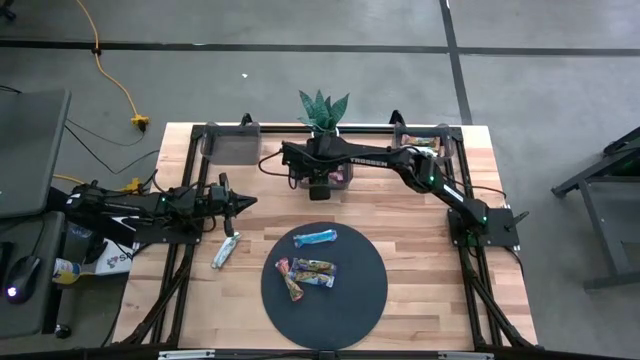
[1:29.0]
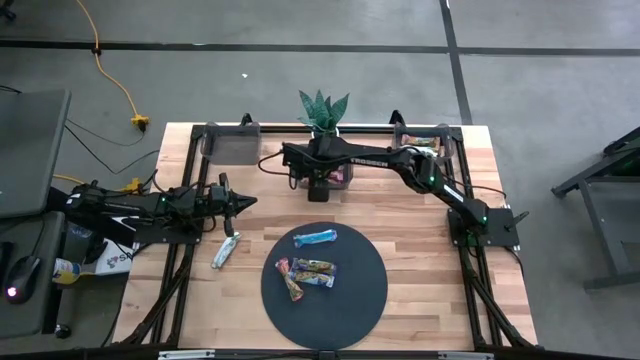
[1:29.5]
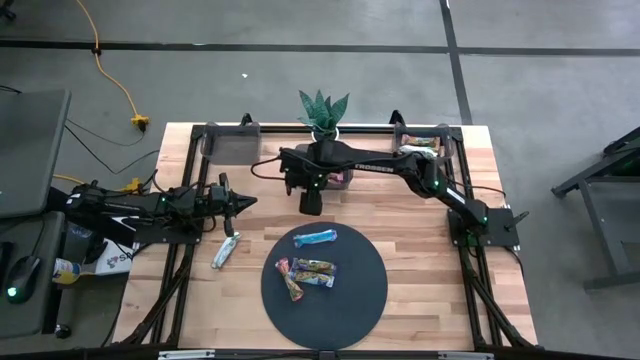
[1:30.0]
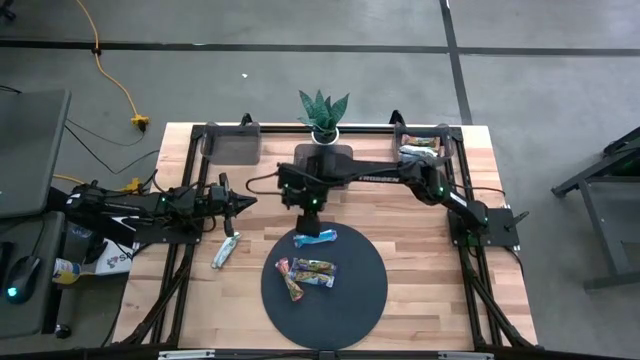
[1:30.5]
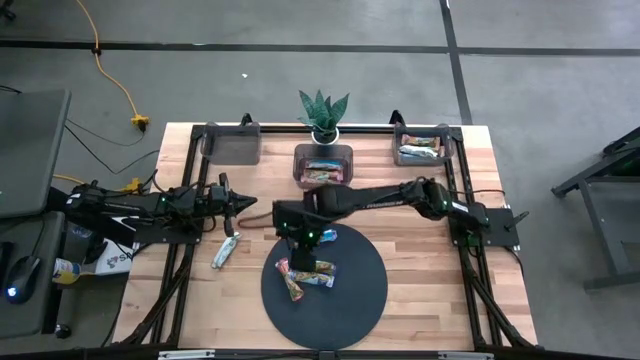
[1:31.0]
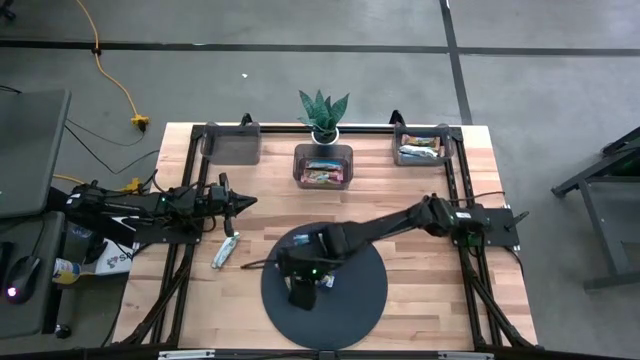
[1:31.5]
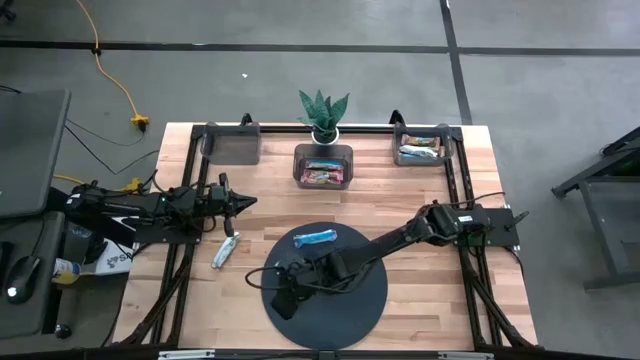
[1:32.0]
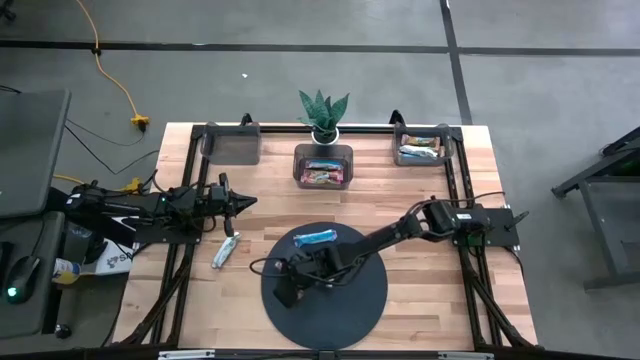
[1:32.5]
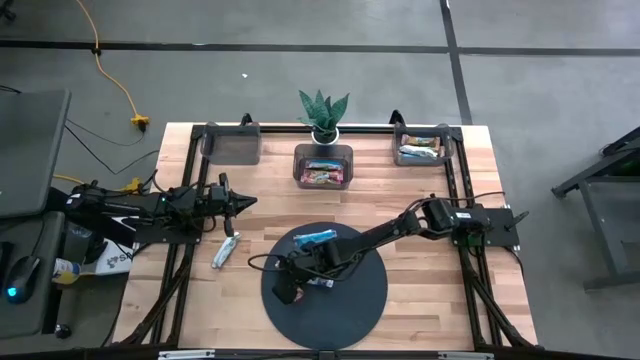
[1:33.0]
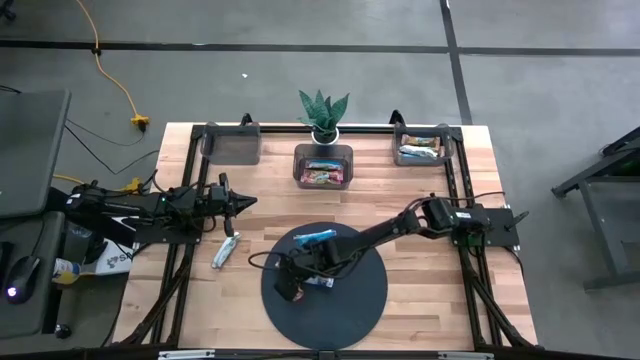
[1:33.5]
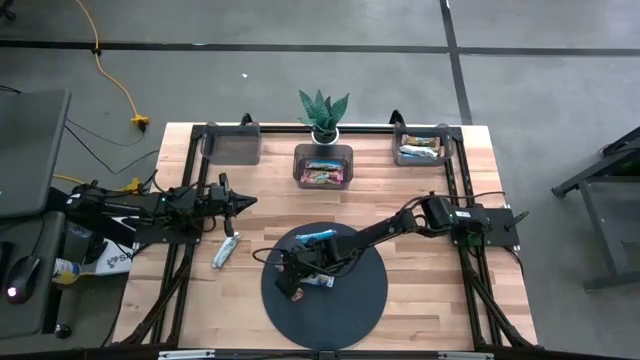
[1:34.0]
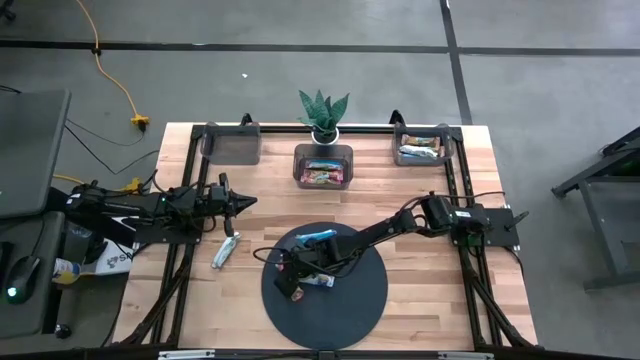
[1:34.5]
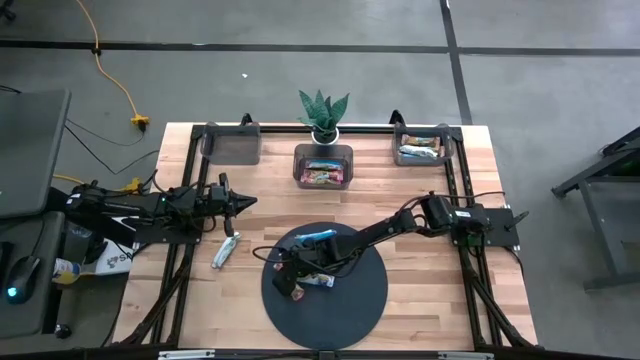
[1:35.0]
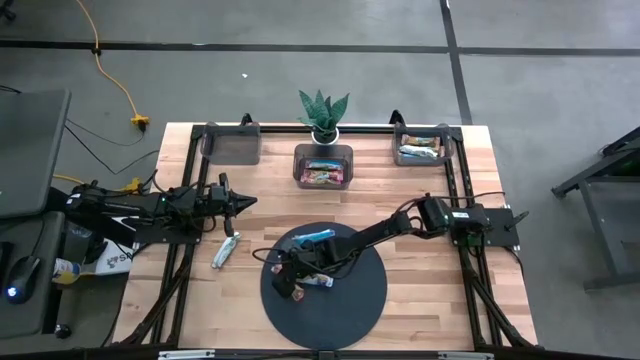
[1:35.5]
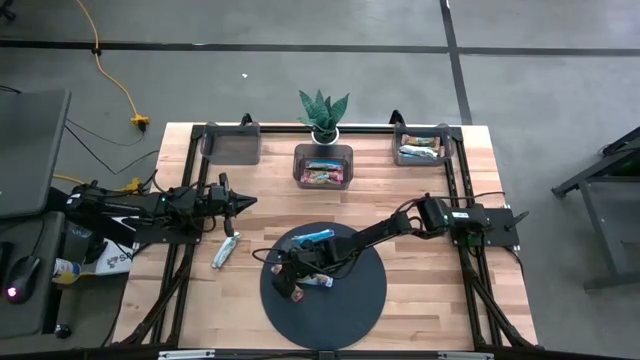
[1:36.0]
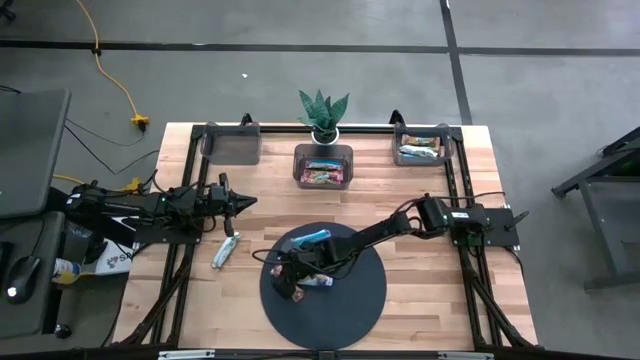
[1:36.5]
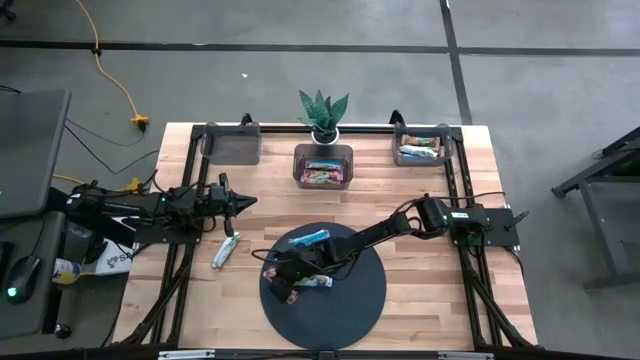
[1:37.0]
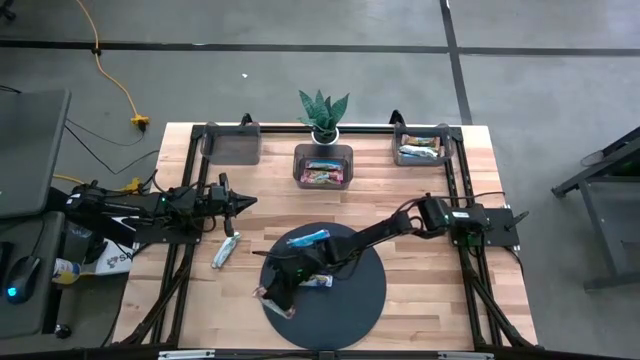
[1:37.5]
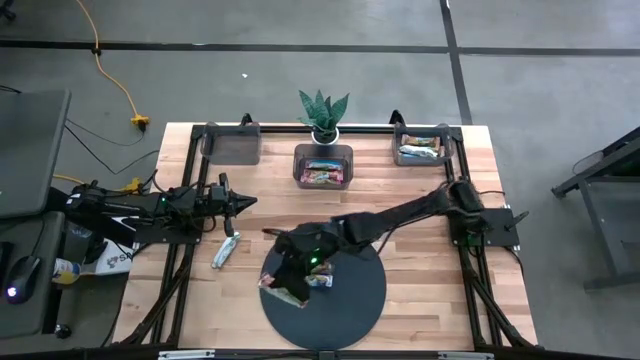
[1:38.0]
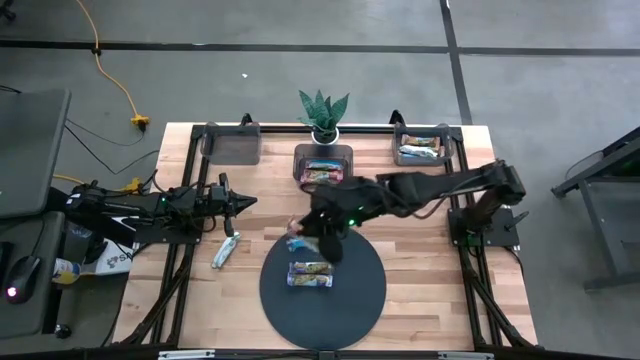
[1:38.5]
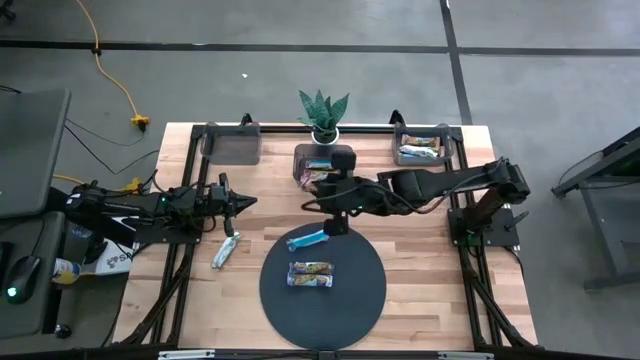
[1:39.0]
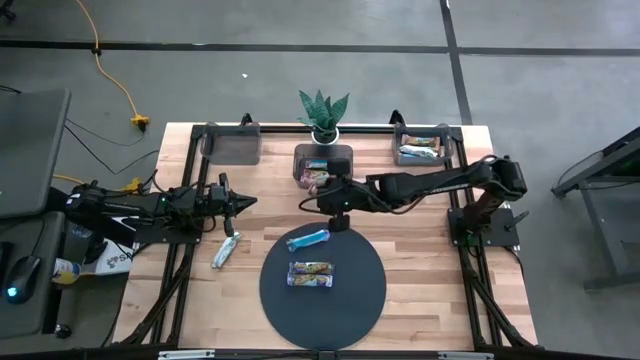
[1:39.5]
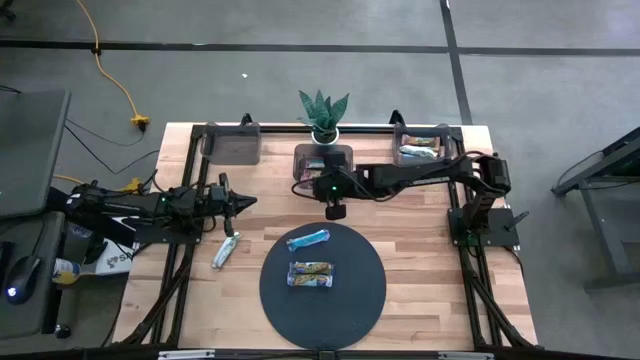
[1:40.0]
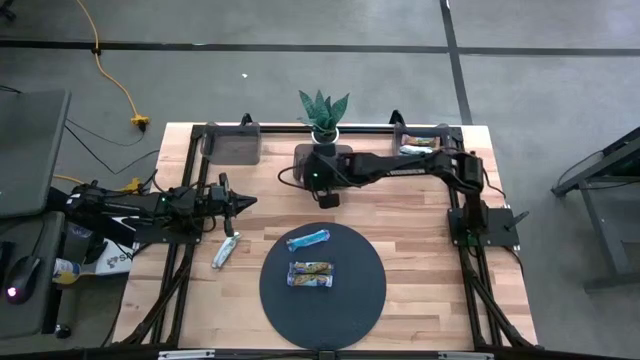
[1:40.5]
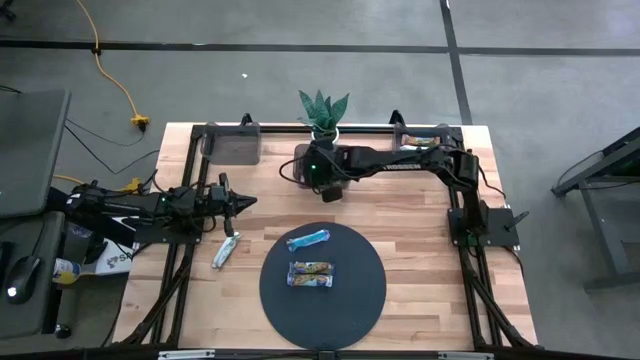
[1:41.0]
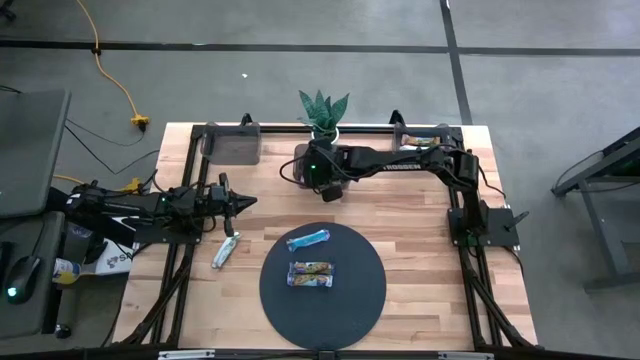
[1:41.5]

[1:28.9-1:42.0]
Task: Pick and place Granola Bars by type
Put the red granola bar into the middle black bin

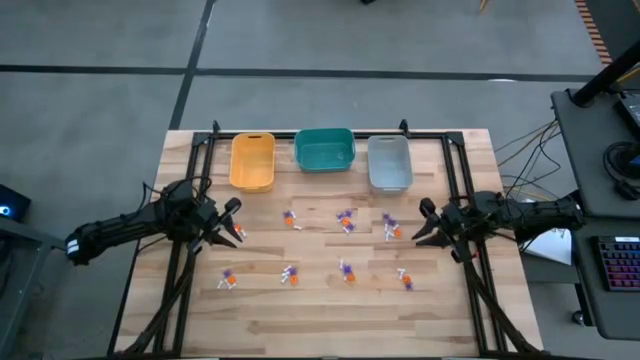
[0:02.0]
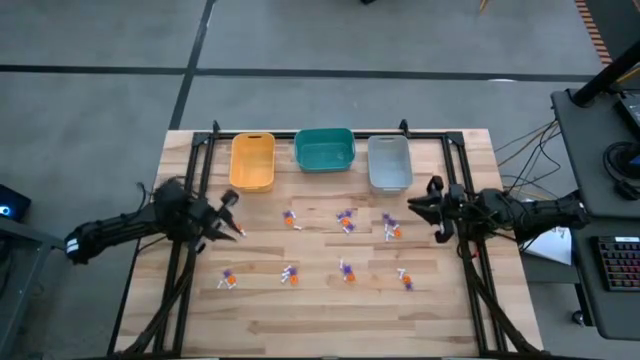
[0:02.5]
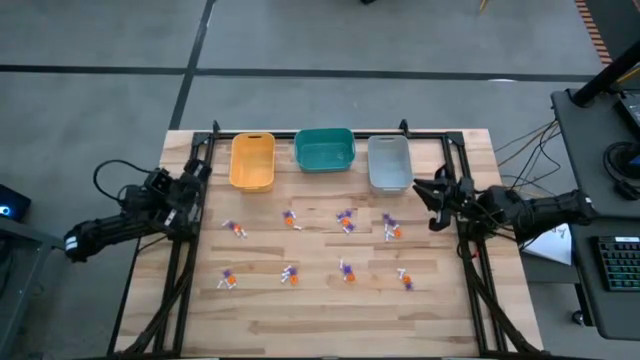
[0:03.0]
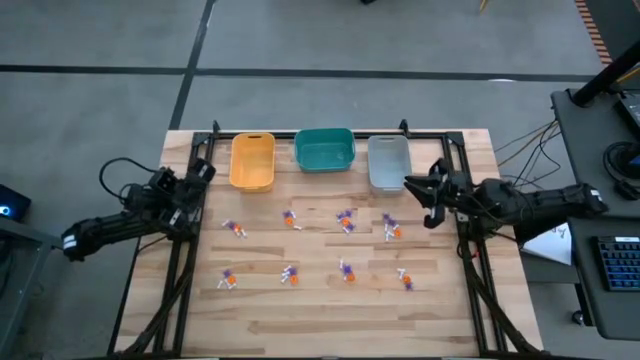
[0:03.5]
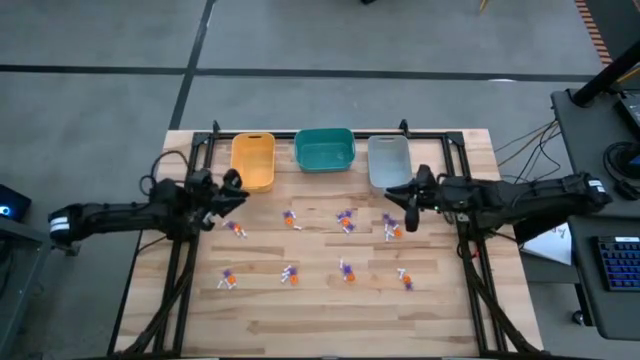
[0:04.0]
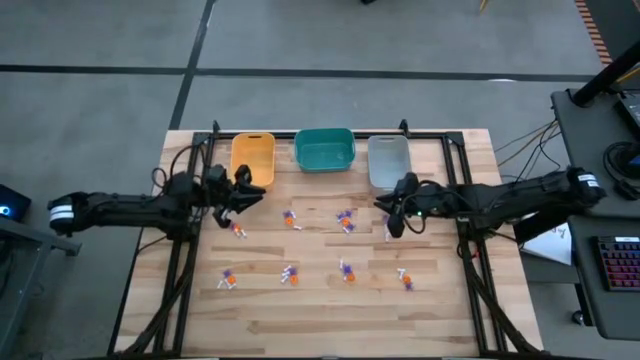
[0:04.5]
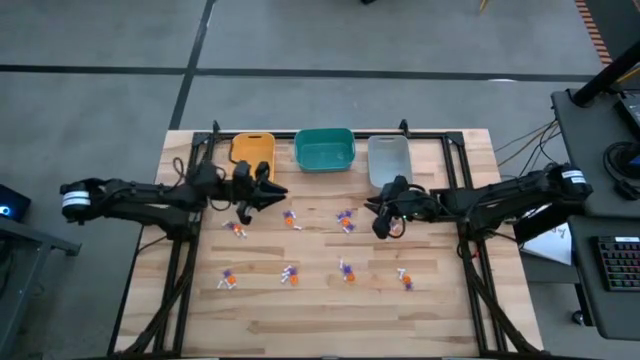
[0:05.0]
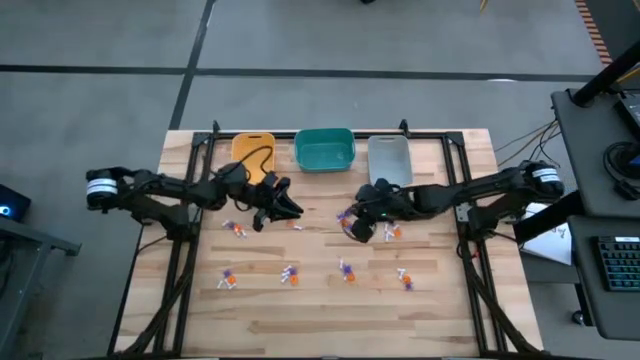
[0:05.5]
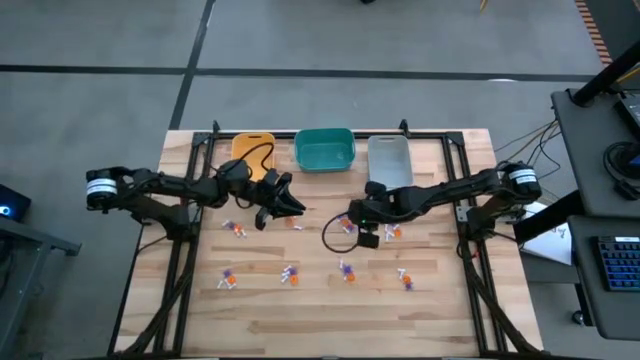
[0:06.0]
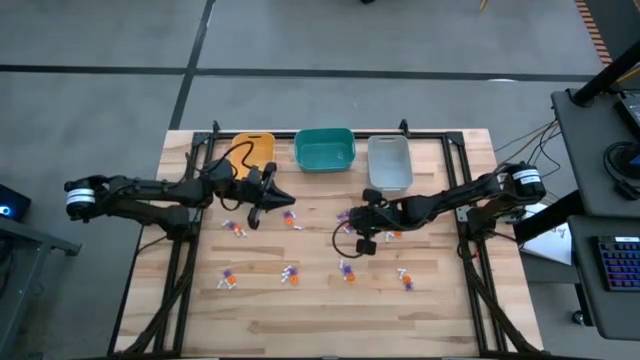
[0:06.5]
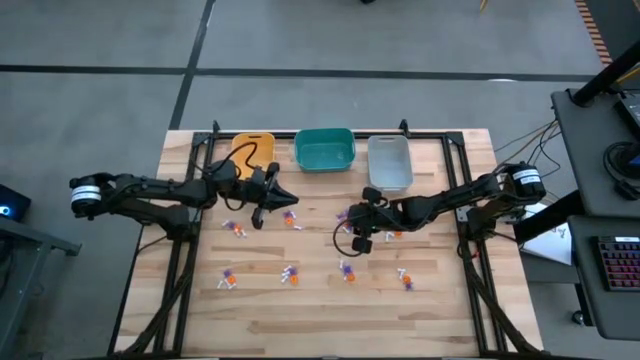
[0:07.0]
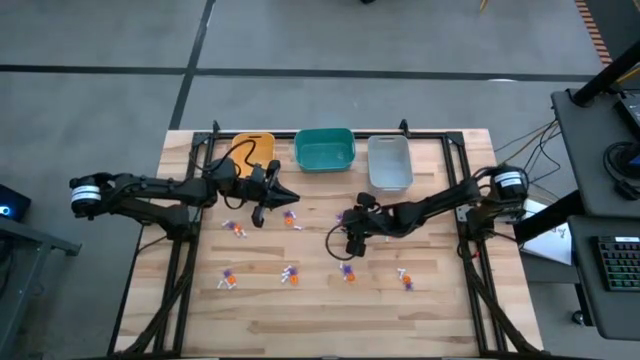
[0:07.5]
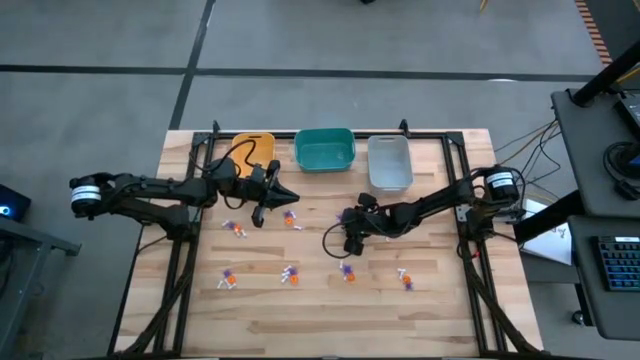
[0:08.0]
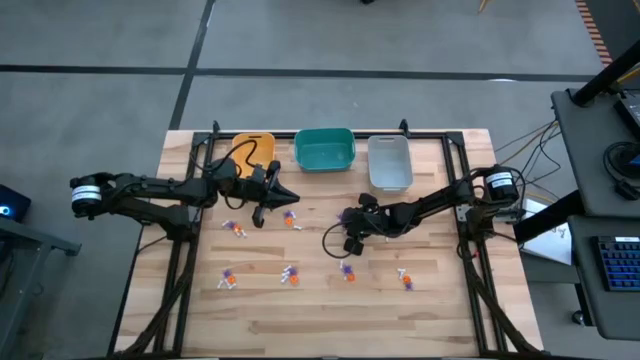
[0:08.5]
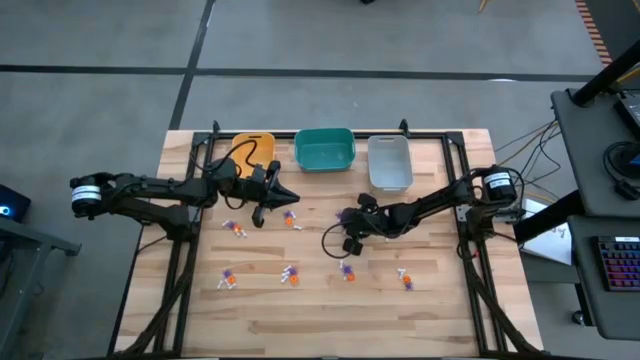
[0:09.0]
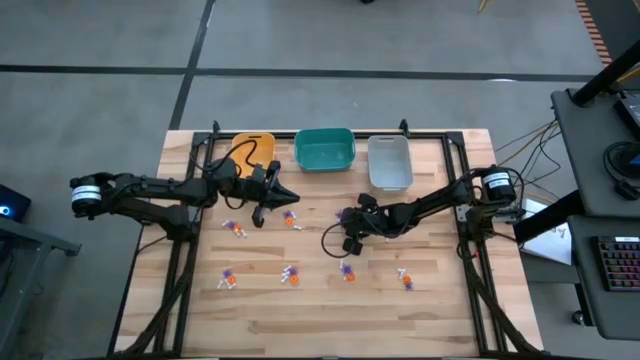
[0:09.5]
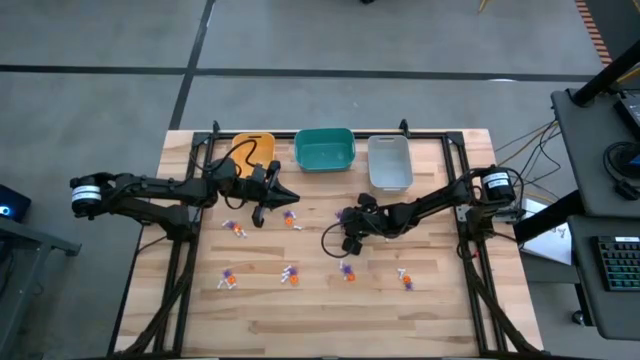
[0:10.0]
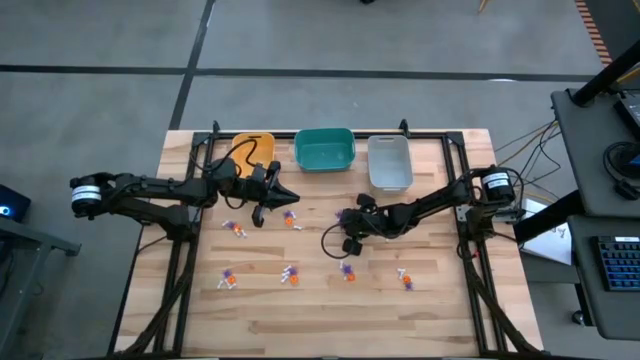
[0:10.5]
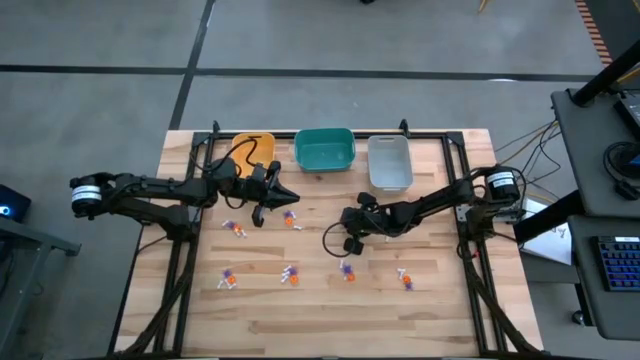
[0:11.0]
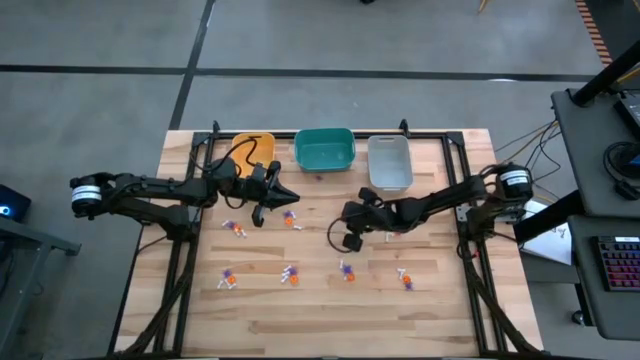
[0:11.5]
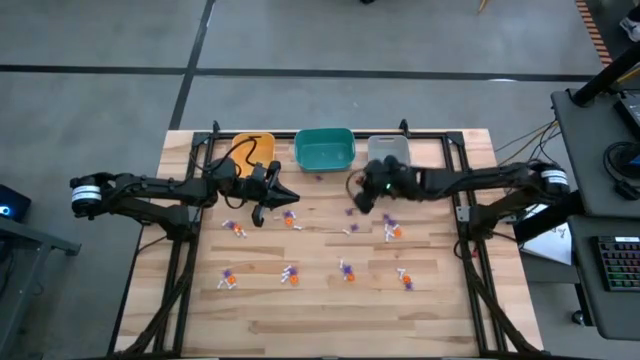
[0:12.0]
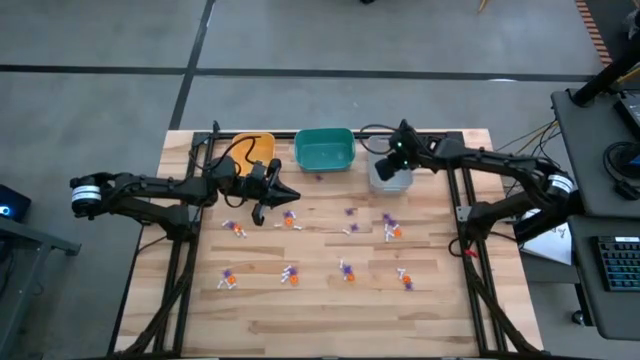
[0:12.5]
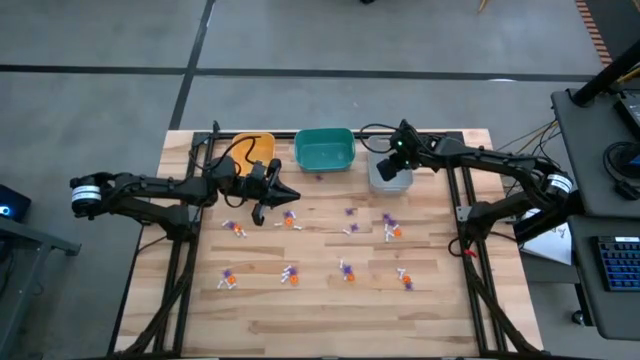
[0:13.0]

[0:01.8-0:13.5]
Task: Sort Halloween decoration
Put the orange pumpkin toy into the white bin
